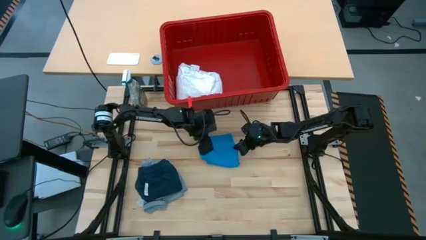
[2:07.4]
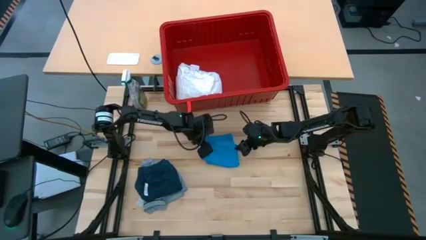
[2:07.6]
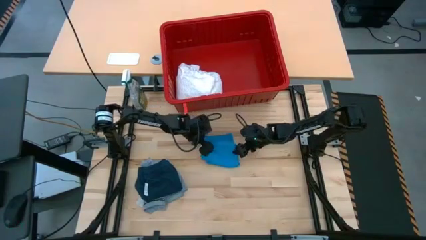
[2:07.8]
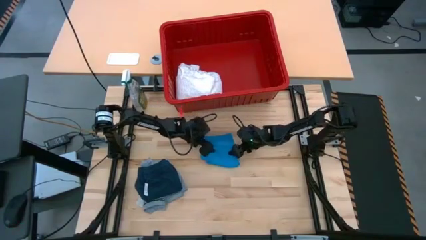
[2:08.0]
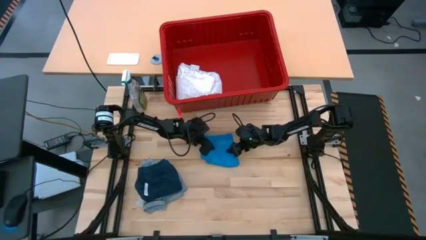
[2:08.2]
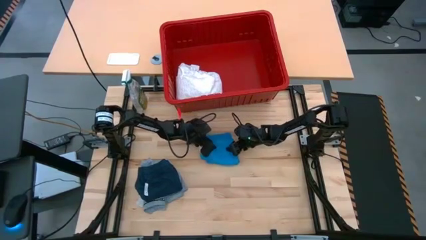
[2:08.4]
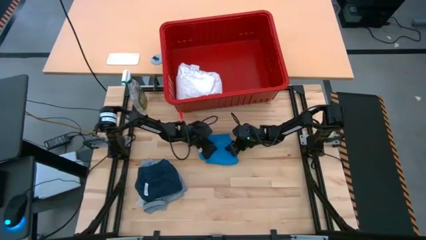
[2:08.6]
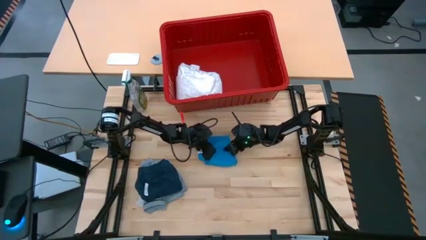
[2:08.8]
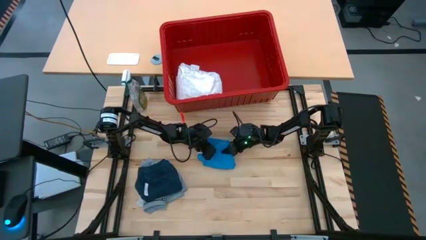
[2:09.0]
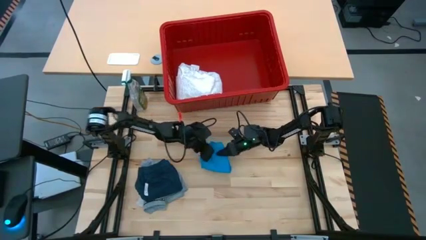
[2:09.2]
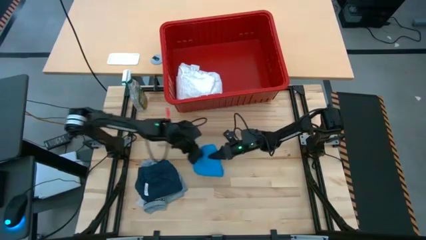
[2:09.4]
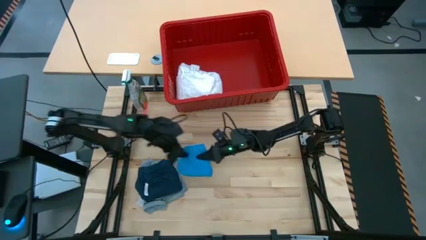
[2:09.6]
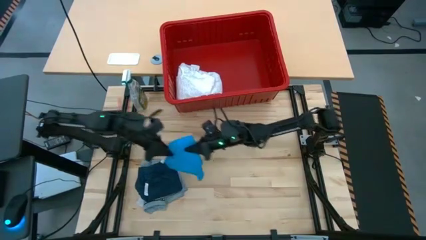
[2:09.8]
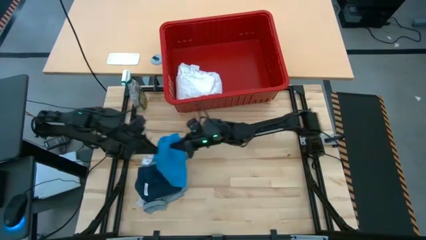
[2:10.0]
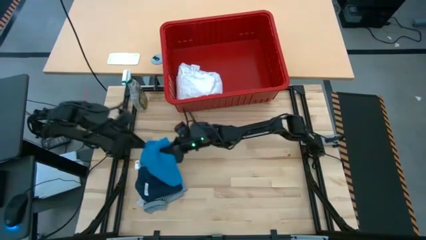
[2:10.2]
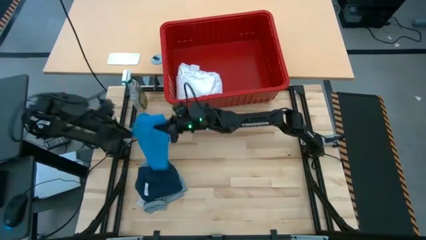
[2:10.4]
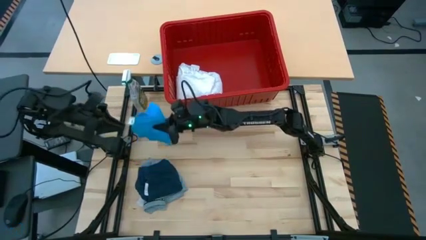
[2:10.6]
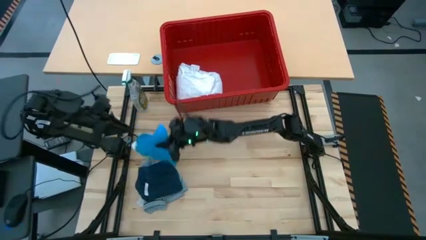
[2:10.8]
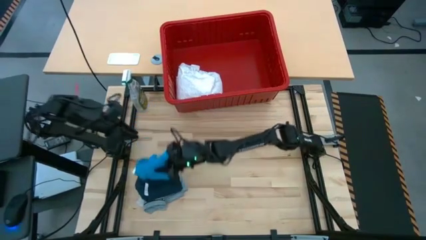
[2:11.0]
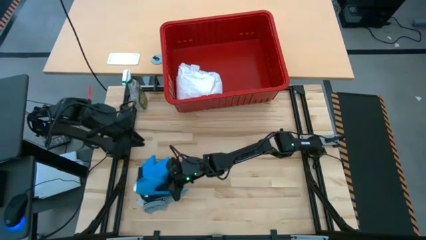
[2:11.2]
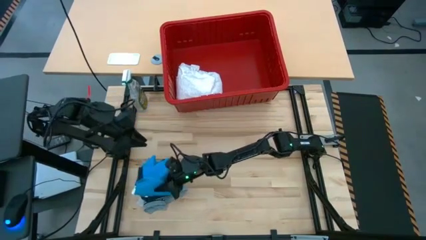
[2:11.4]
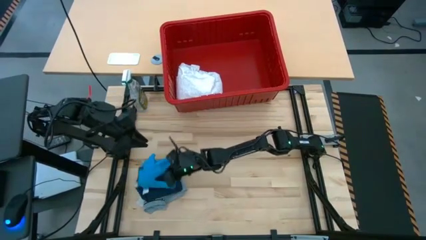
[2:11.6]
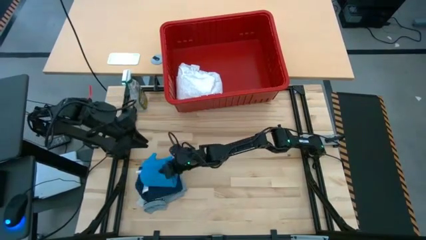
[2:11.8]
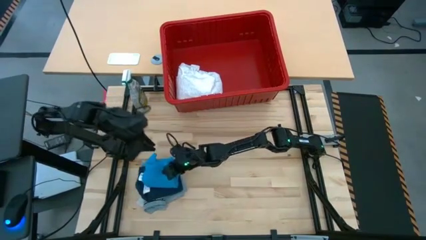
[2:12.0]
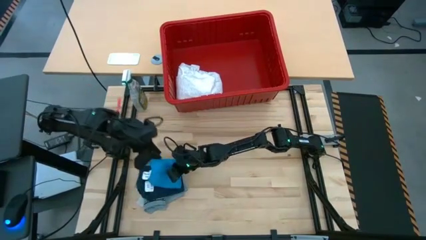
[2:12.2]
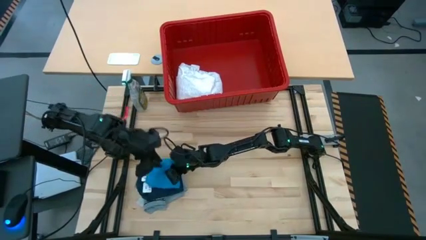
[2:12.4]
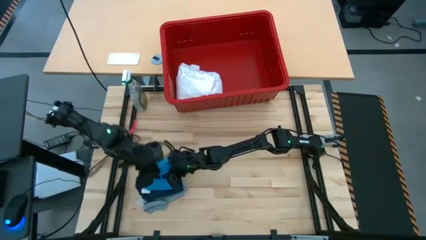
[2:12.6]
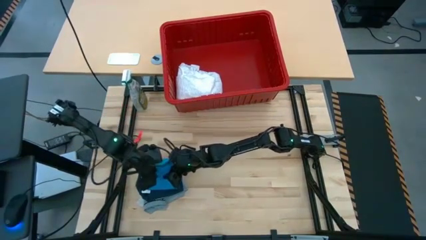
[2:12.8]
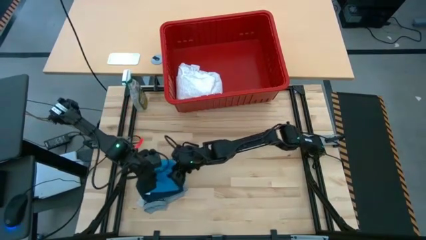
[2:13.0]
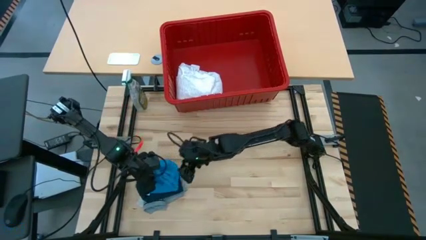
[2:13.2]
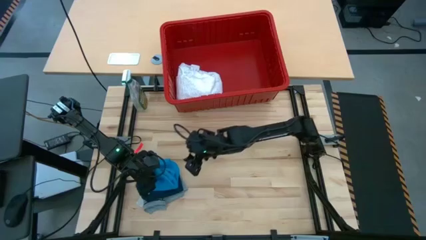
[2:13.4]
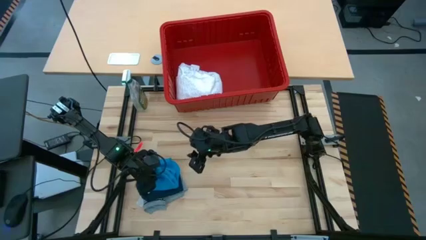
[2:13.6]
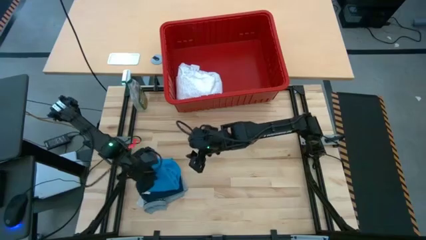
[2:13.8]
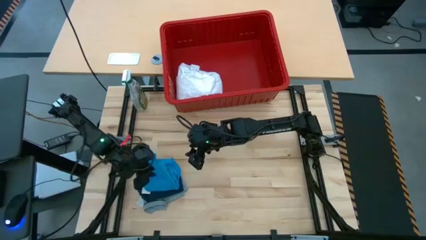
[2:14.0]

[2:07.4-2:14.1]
Task: Fold laundry
Stack the folded blue pants on top of the black pants

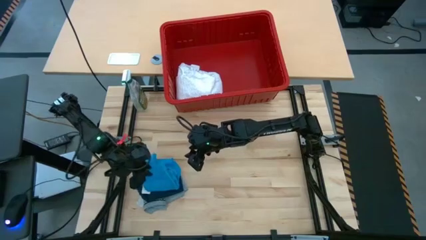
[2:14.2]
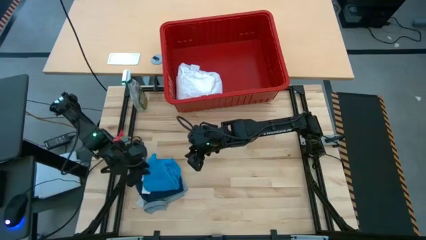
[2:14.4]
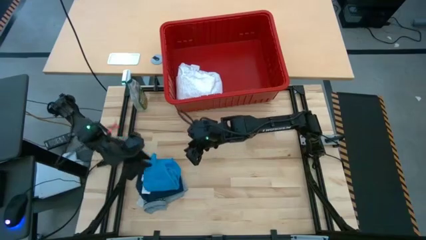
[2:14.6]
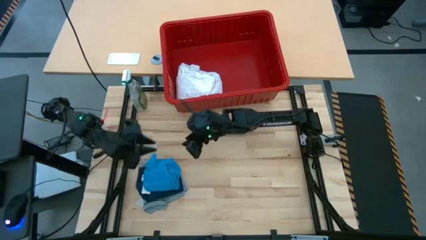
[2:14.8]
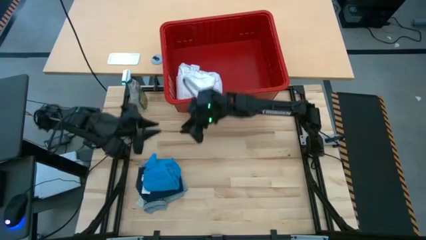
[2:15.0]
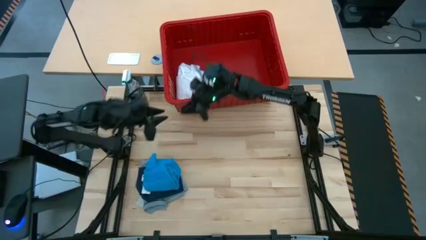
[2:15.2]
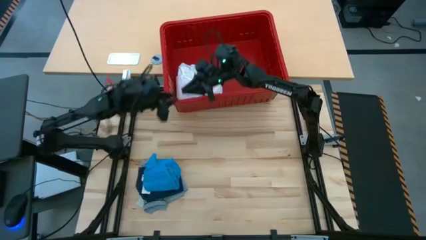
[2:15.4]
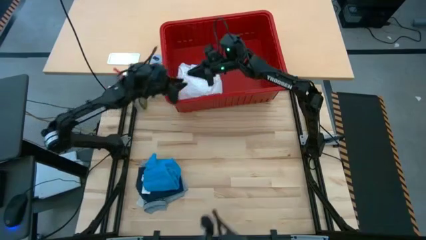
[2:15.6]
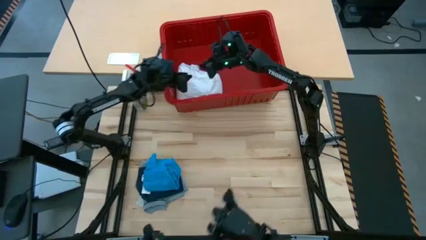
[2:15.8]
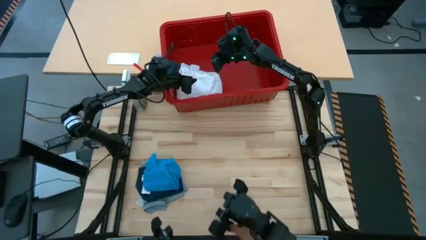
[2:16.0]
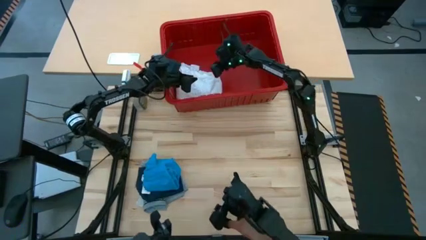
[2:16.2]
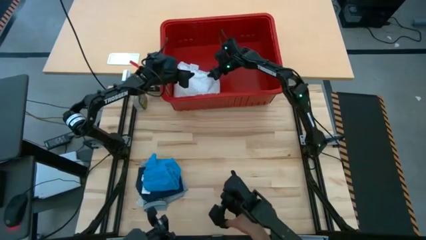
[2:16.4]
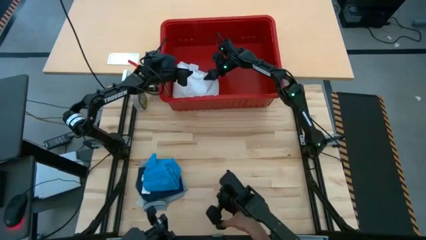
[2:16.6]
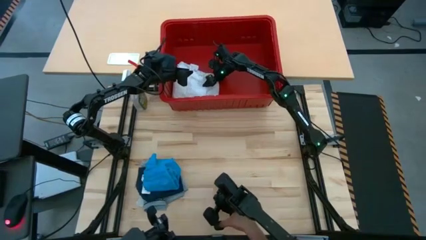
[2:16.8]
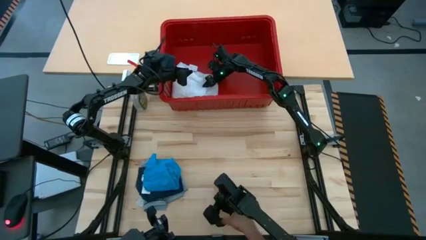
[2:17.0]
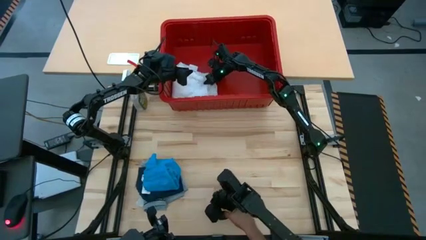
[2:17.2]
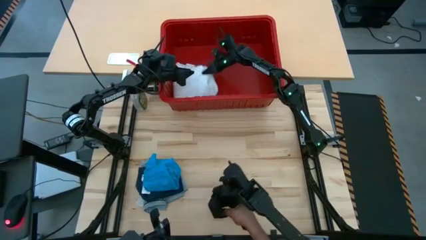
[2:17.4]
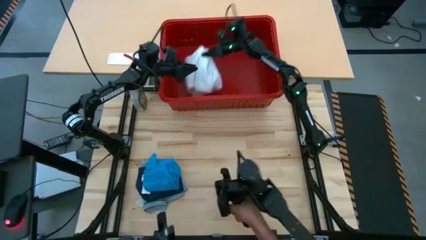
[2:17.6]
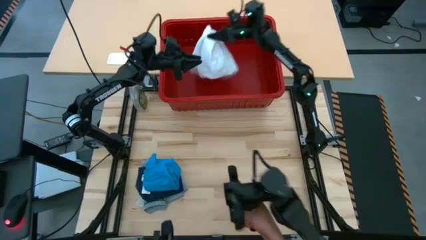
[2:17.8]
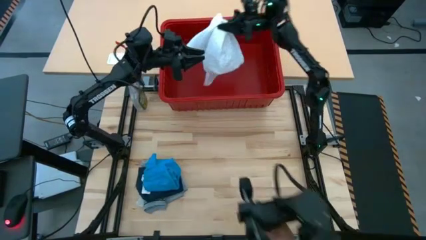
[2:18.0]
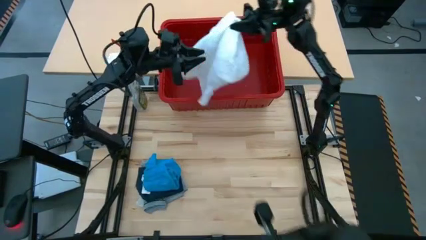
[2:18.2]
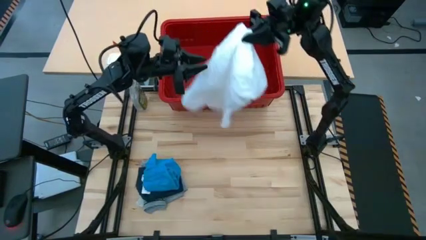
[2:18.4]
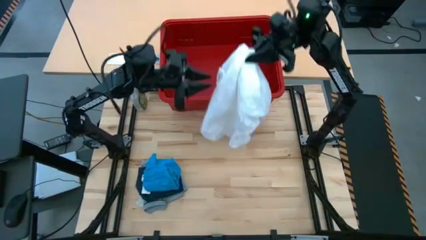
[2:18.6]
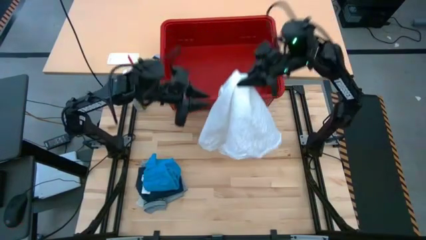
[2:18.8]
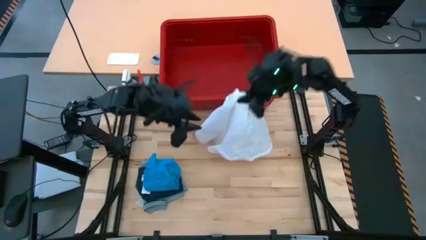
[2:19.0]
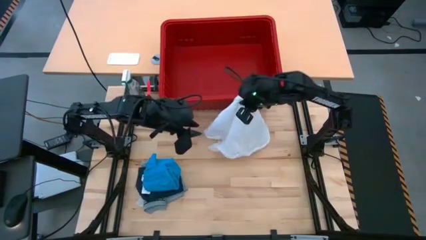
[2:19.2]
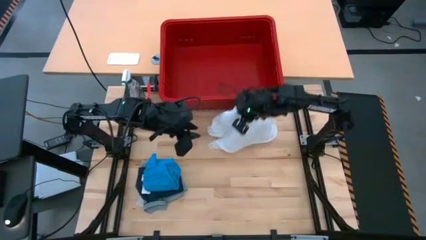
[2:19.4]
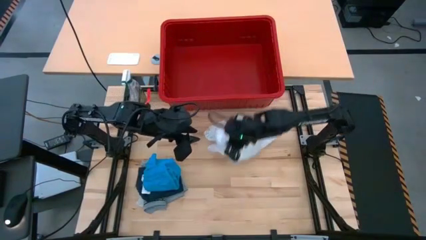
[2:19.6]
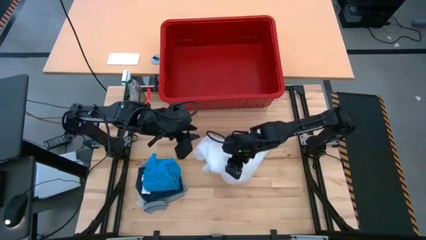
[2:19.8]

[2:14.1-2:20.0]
Remove the white blouse from the red laundry bin
